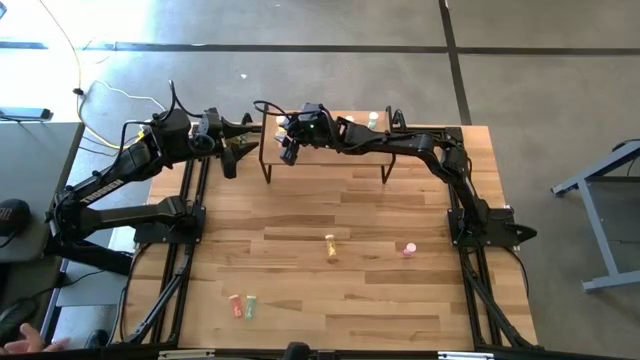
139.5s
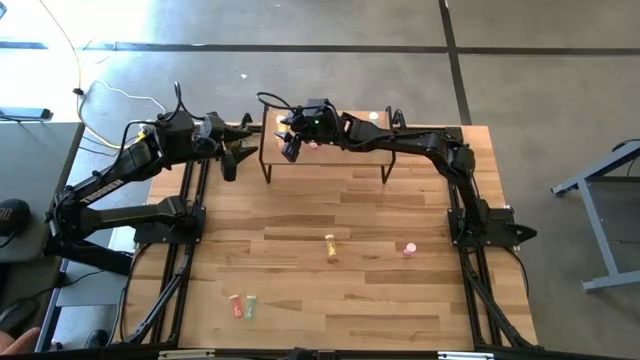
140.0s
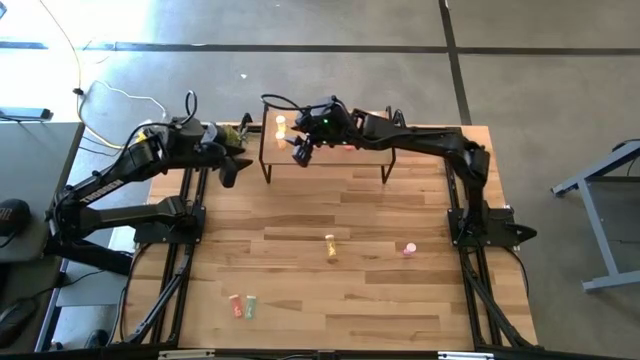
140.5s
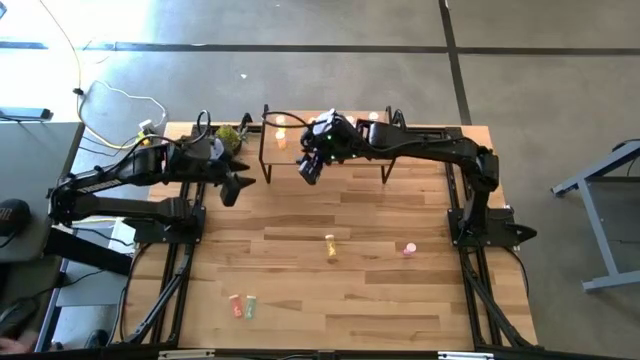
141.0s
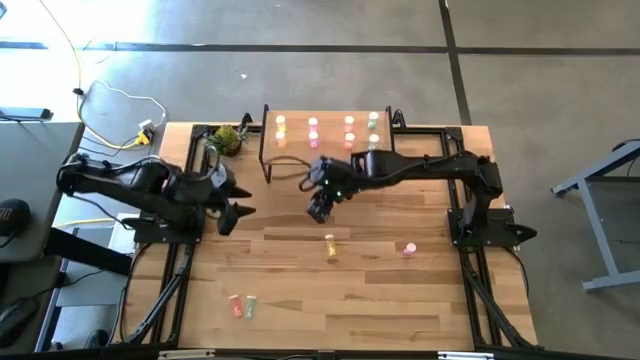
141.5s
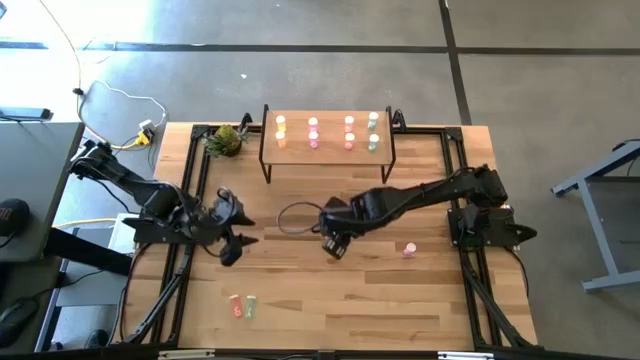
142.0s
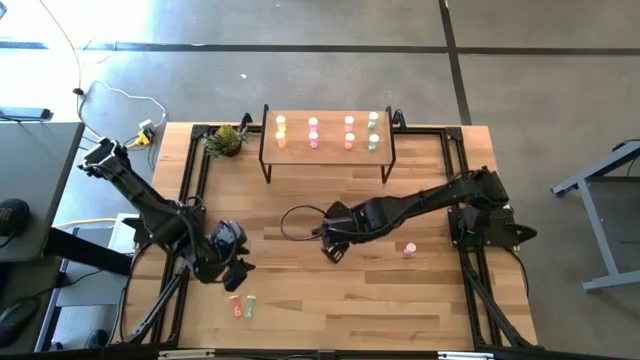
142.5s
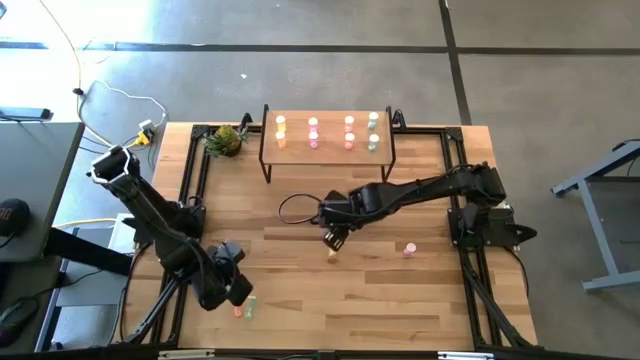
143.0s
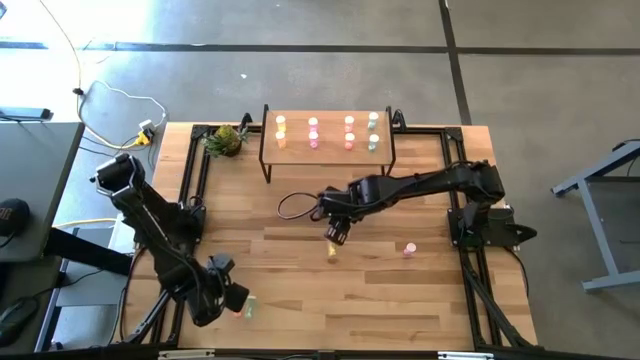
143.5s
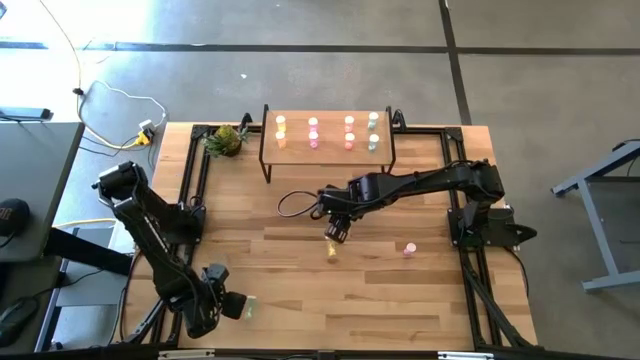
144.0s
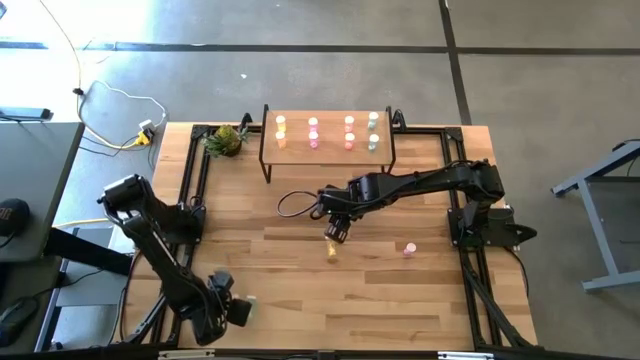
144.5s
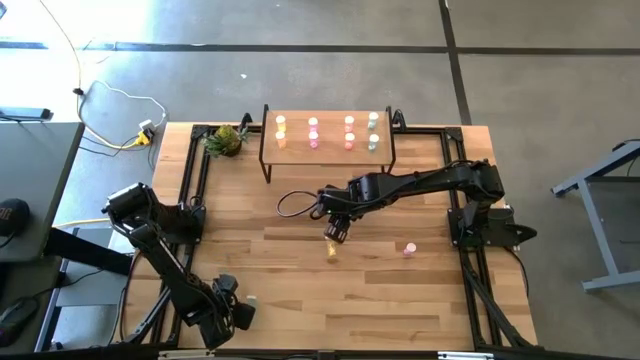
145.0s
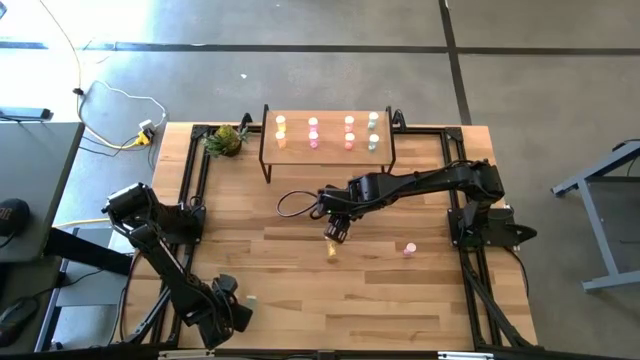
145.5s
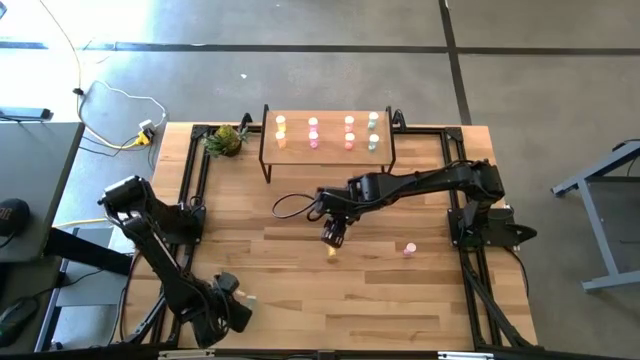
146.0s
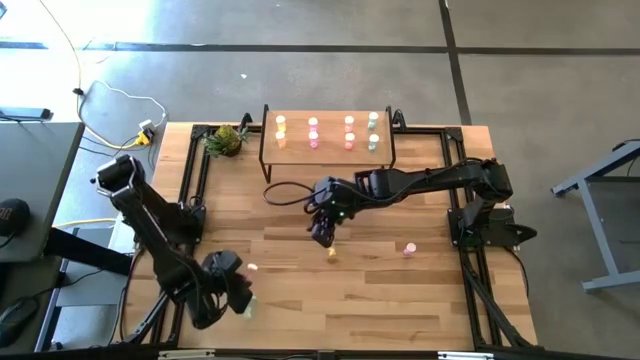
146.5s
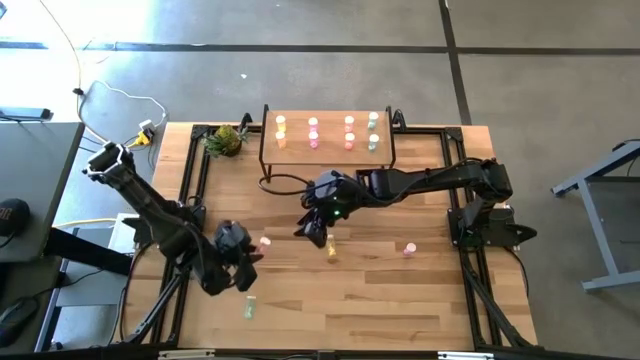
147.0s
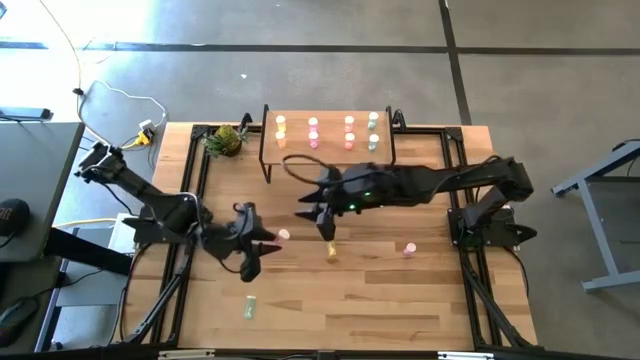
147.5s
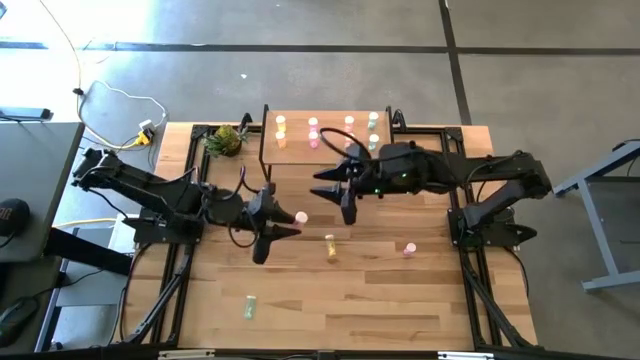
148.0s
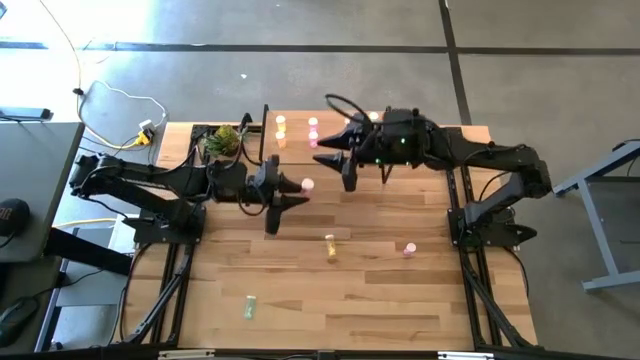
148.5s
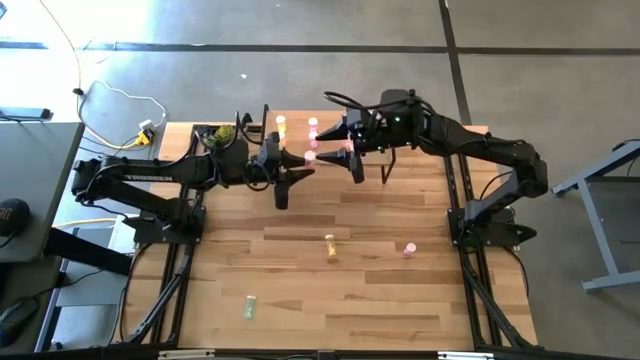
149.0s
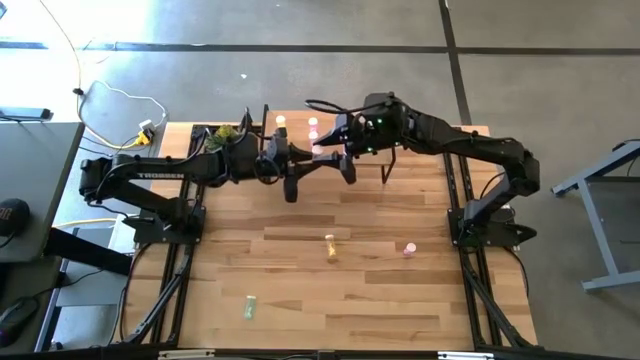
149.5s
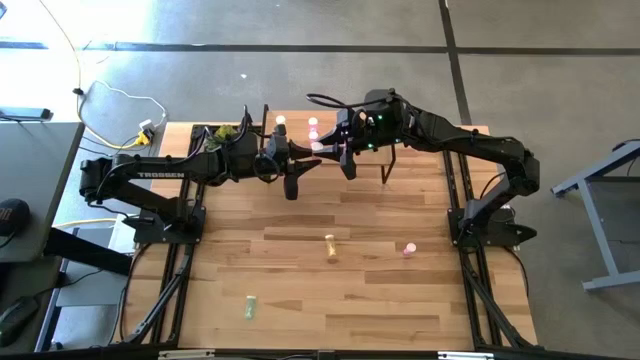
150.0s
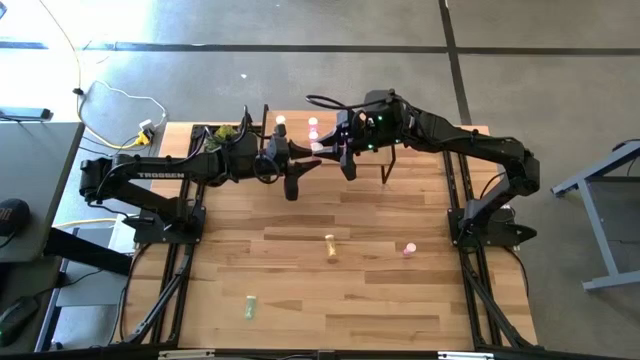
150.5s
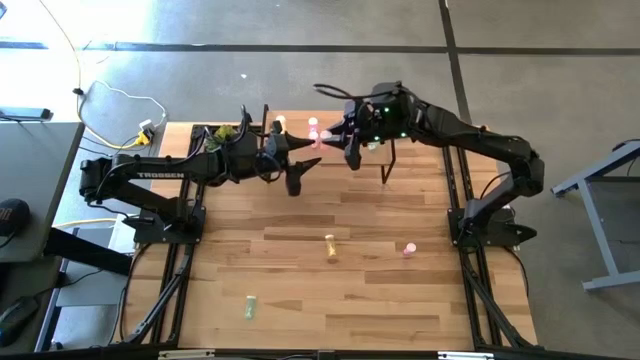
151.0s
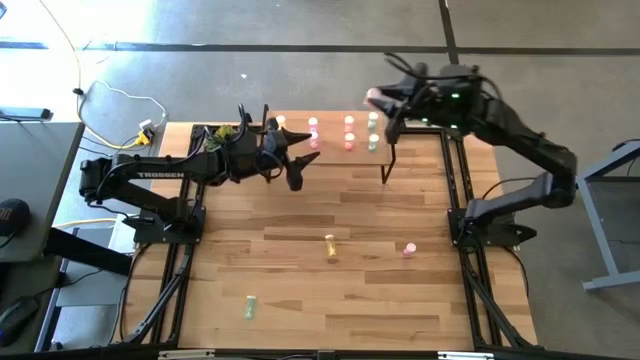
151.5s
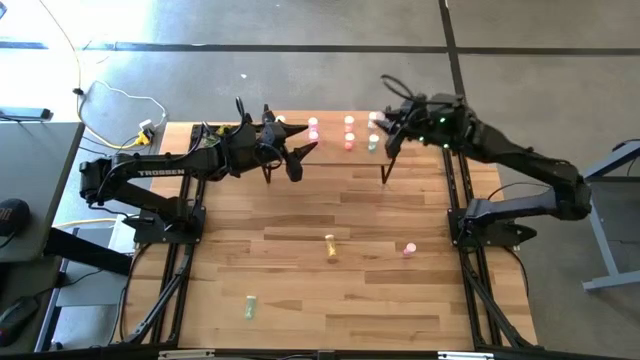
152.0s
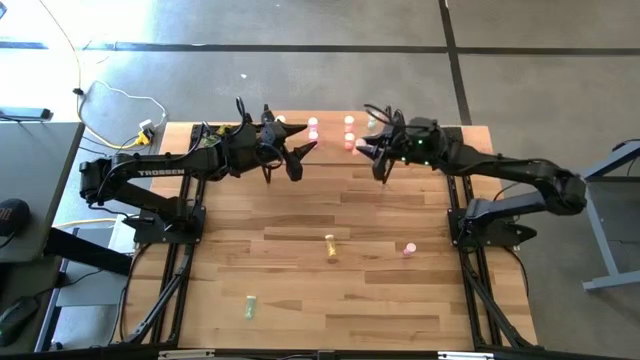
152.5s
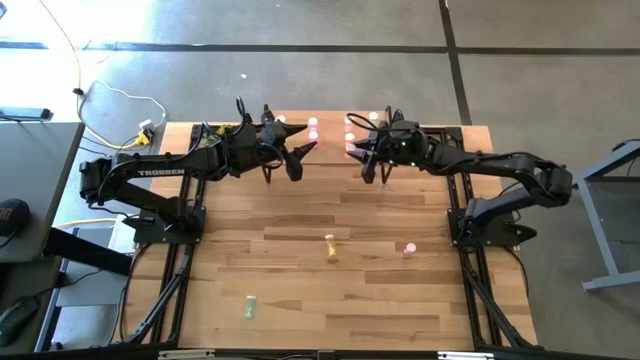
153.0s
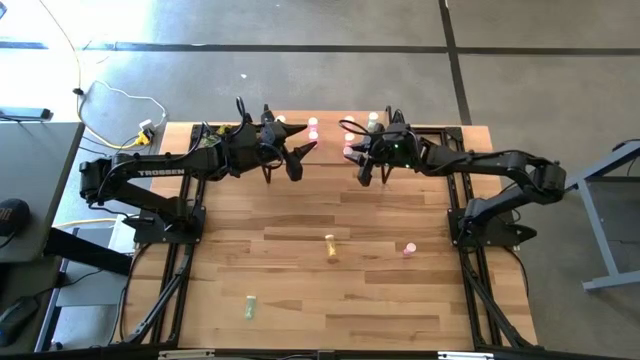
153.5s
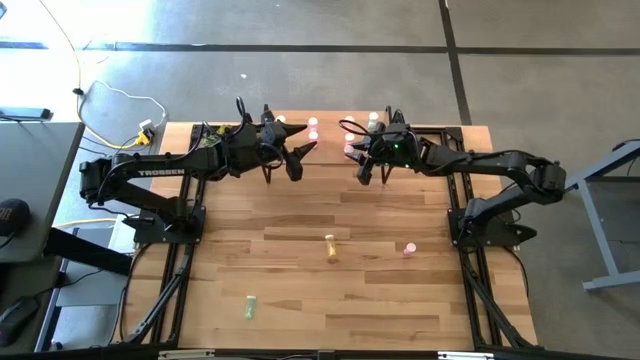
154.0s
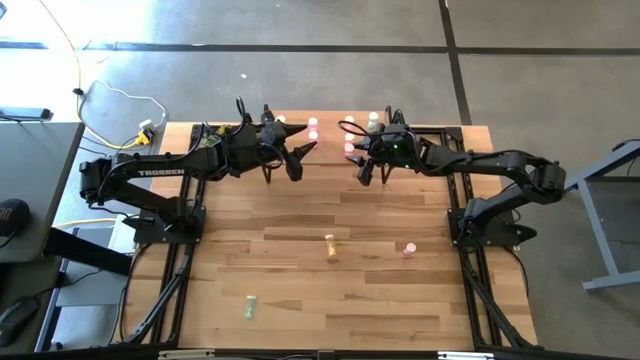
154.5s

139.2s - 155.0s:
Task: Pick and place medicine bottles onto shelf by color
Put the red pill bottle on the shelf

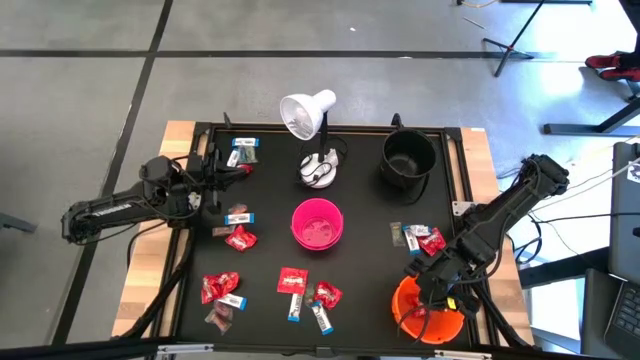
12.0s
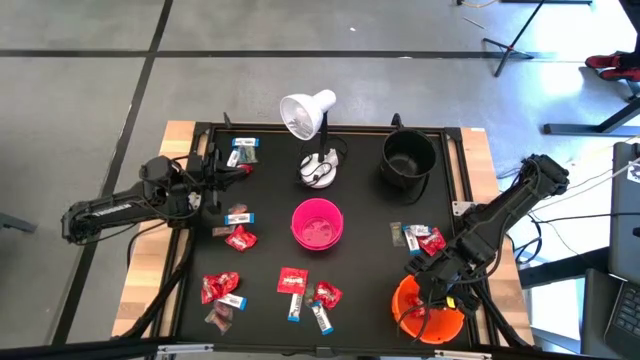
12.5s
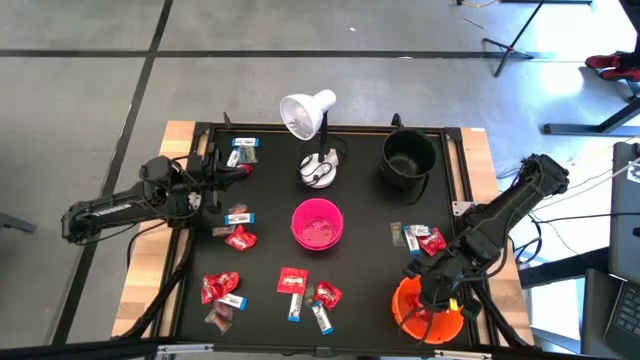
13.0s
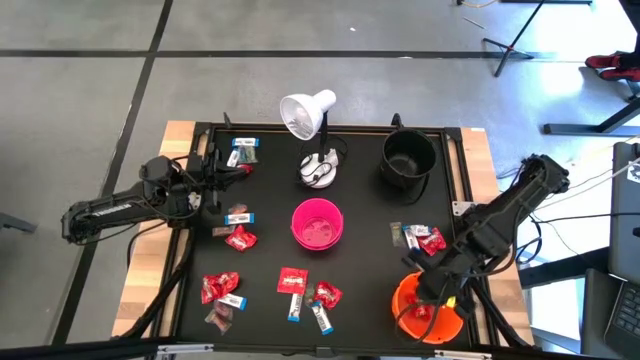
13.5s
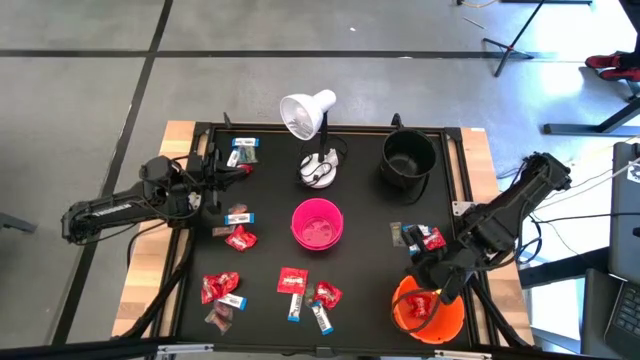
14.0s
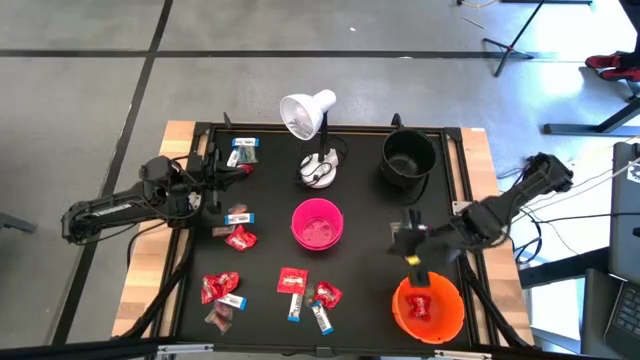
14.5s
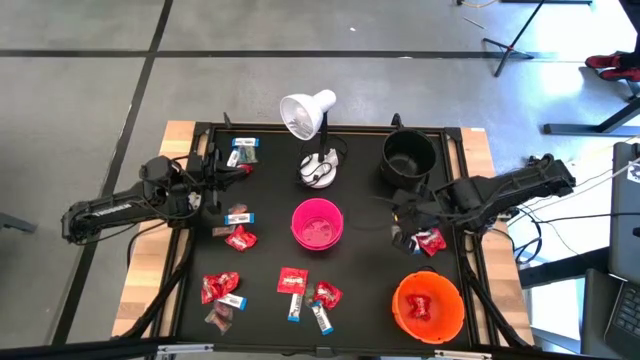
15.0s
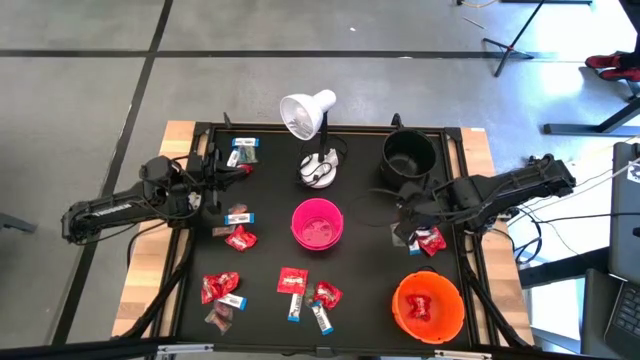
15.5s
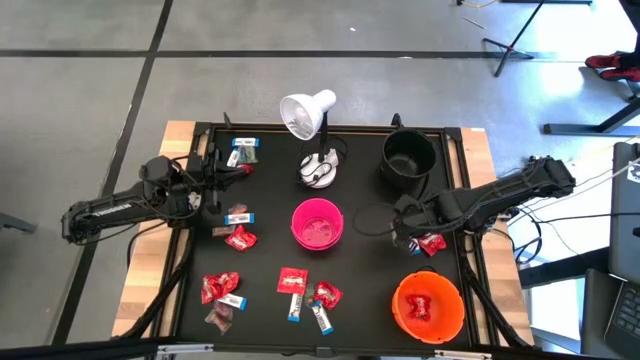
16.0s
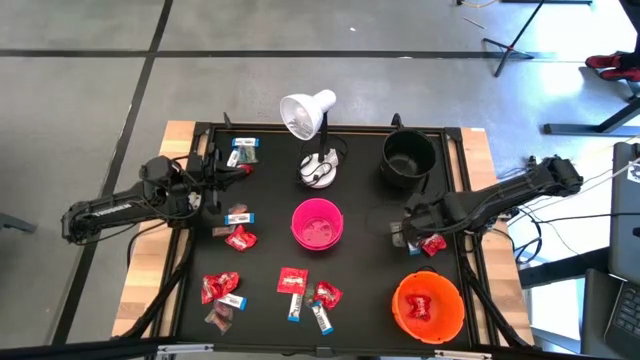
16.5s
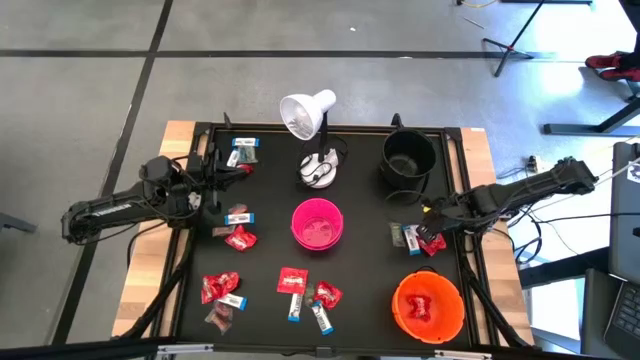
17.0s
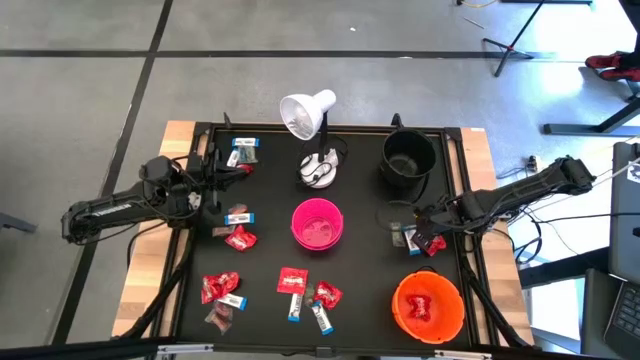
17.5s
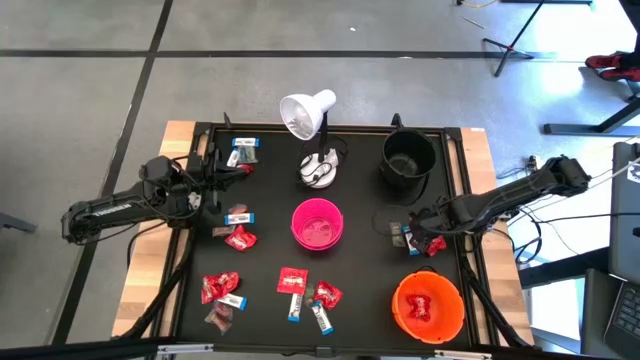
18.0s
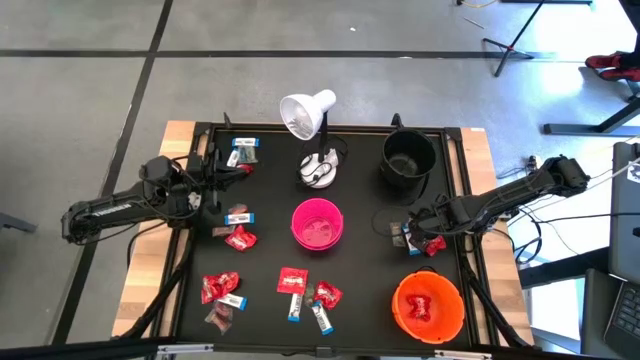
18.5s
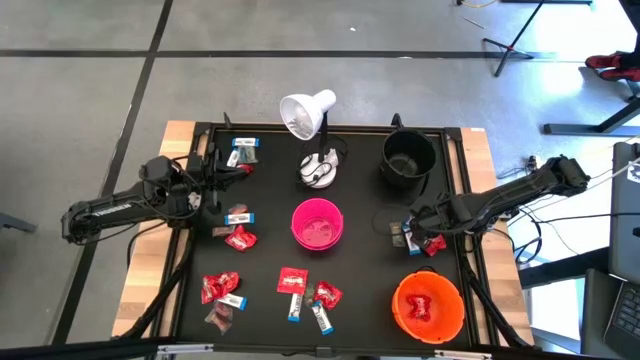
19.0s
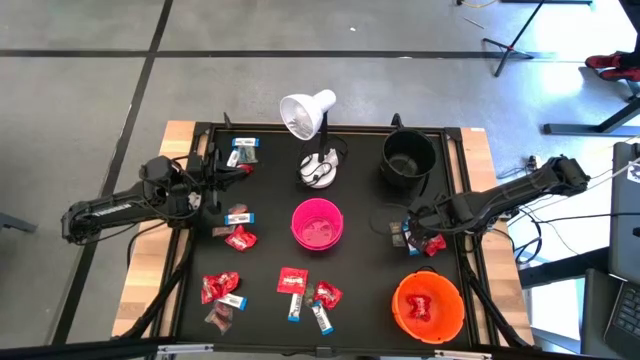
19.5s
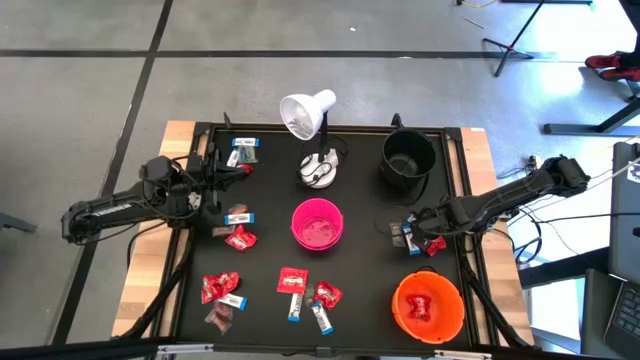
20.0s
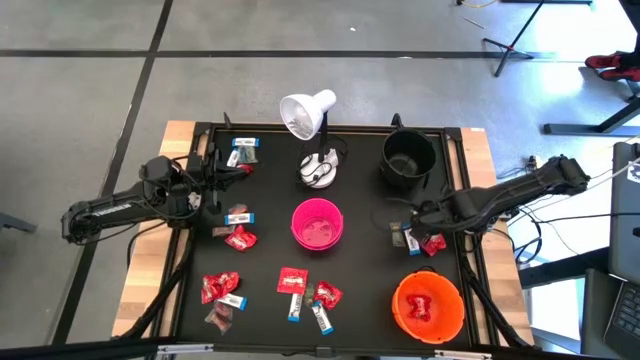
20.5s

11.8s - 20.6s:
Task: Sort candy
Put the white chocolate bar into the black bucket
